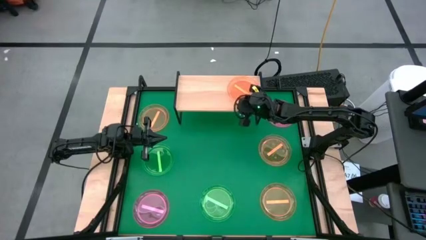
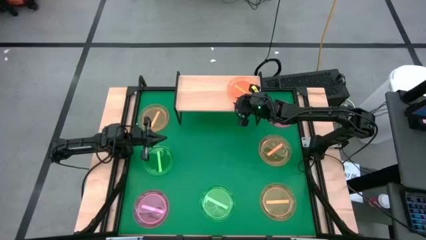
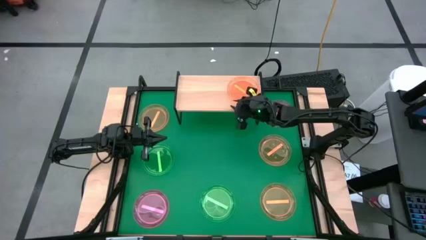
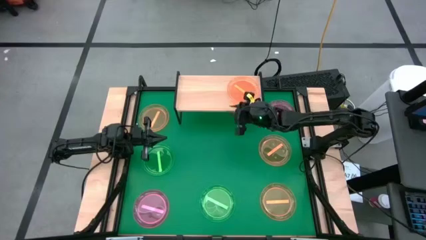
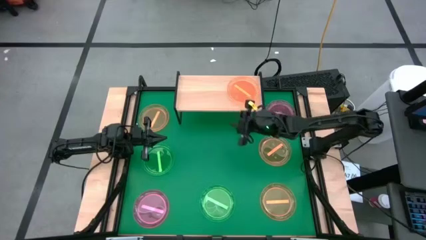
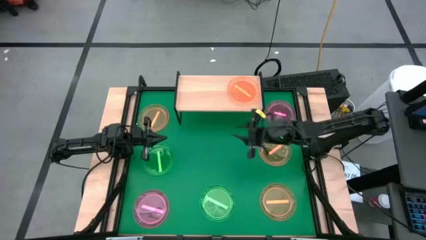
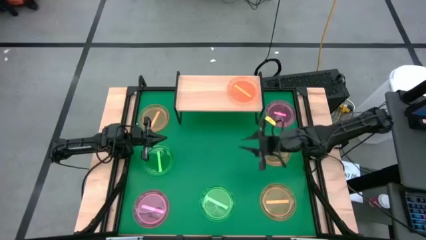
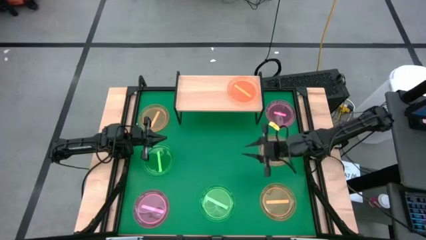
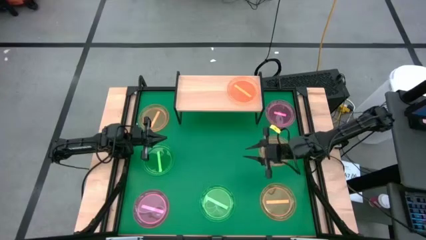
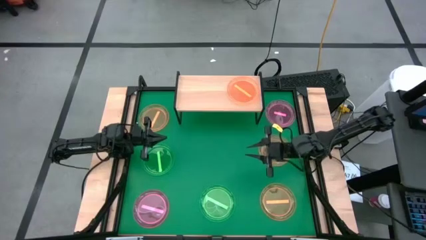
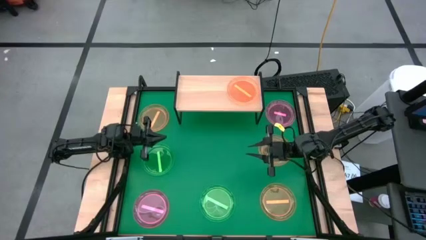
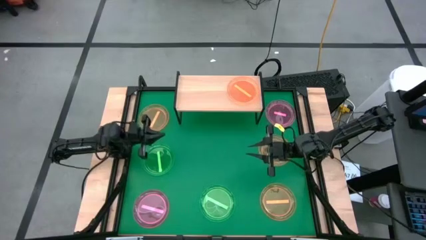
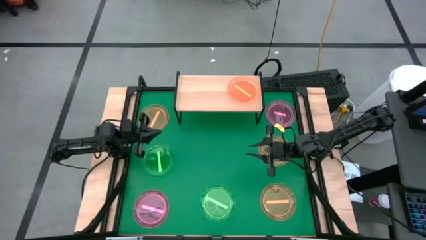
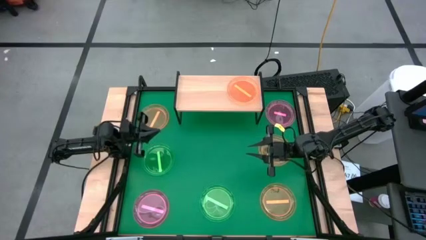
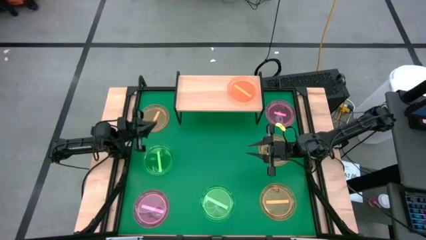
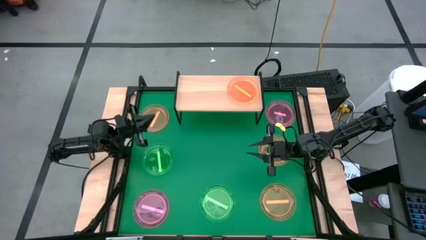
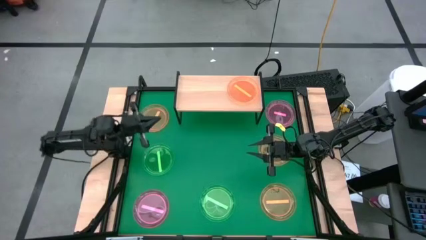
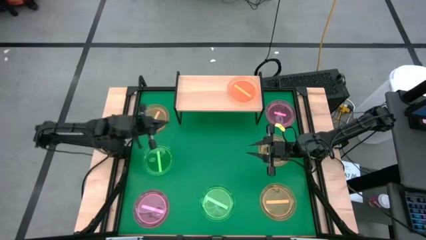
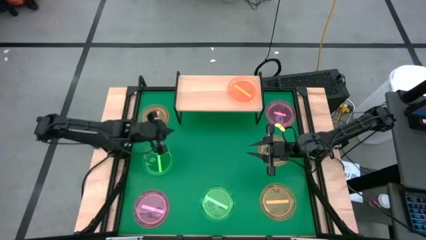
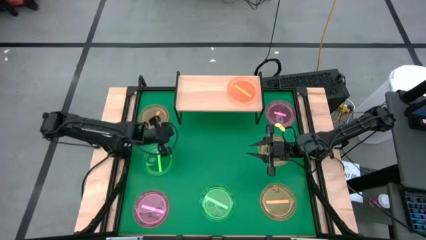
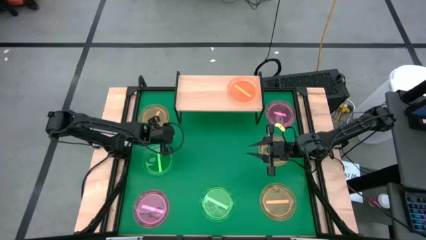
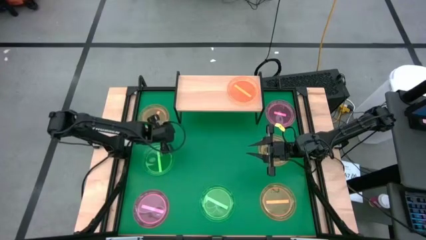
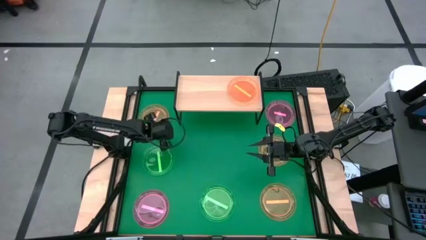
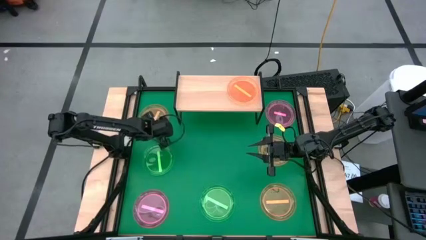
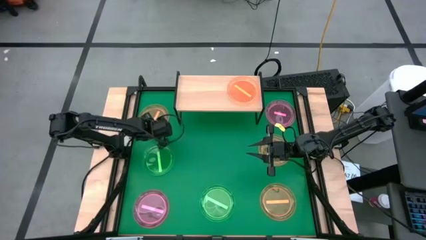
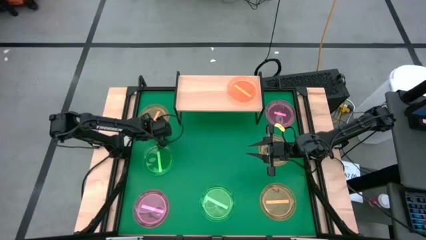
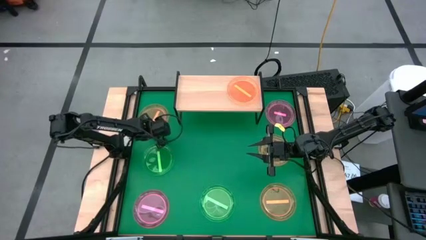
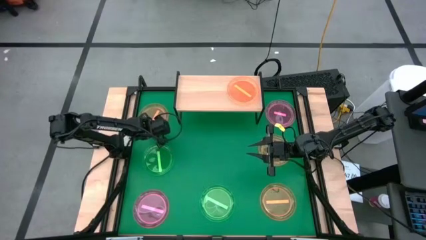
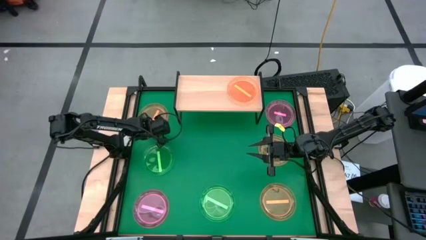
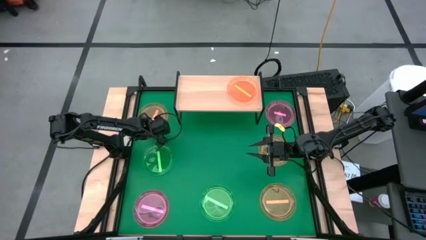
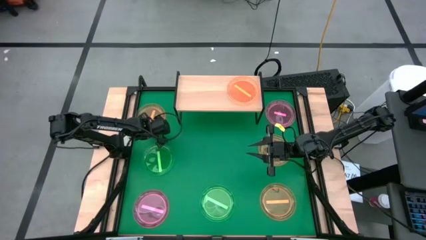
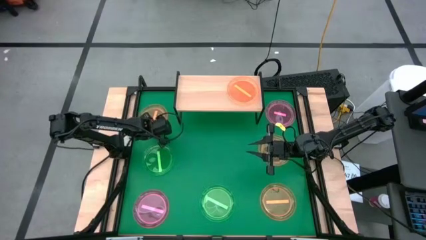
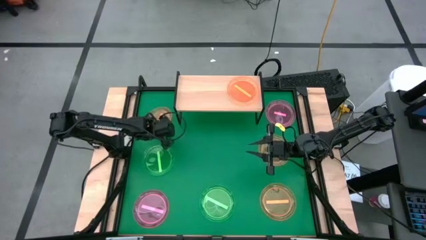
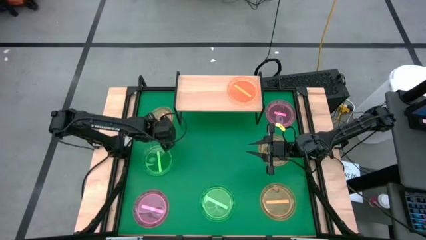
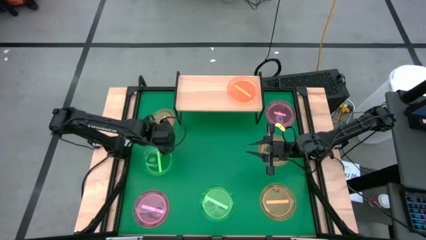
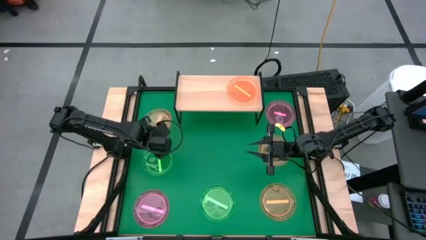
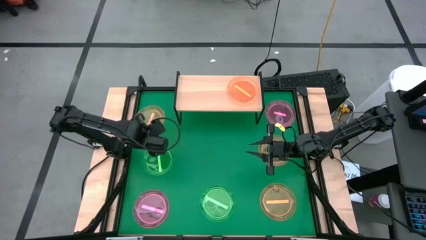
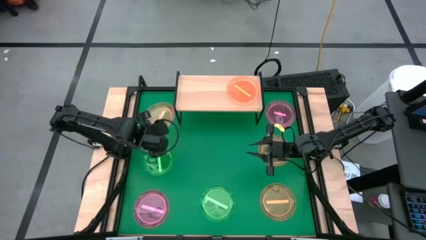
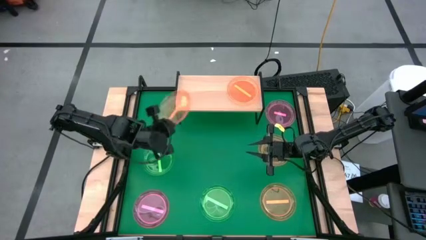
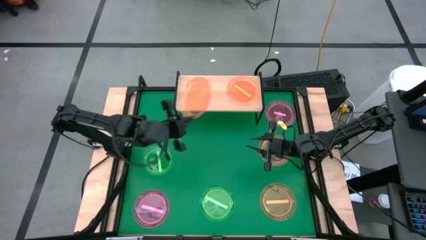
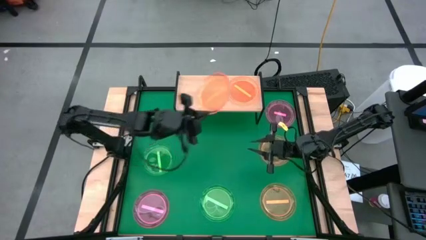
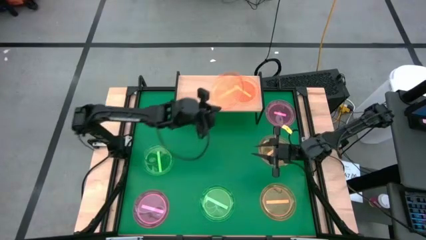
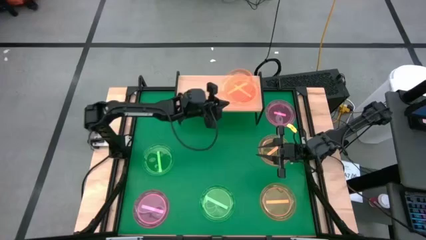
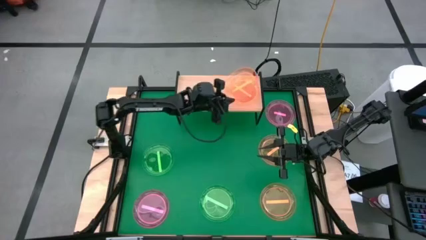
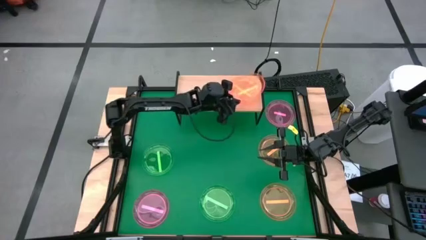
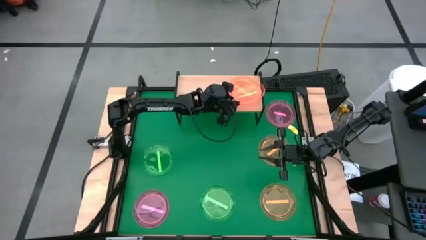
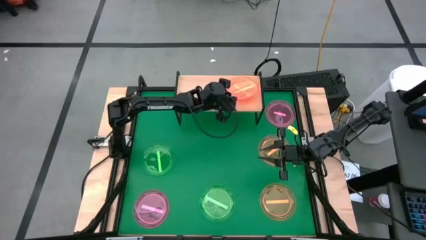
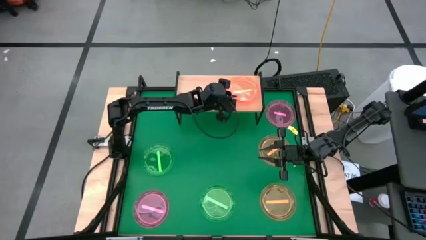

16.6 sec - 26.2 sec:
Task: Place and stack plates onto a shelf
Stack the orange plate on top of the orange plate on the shelf

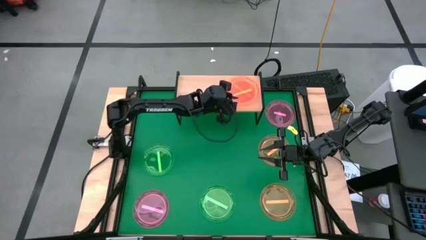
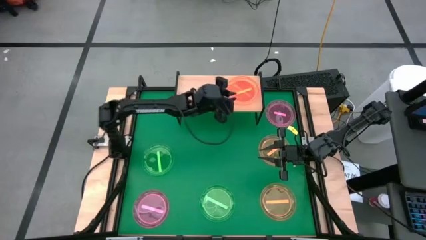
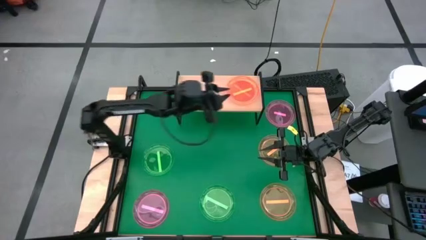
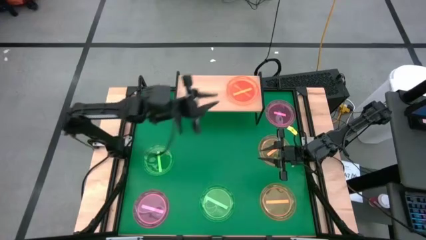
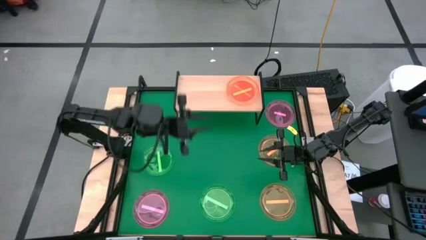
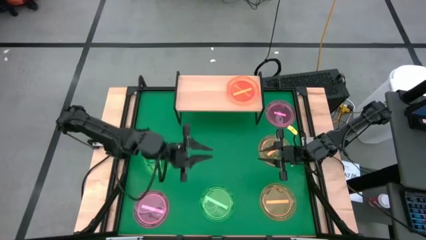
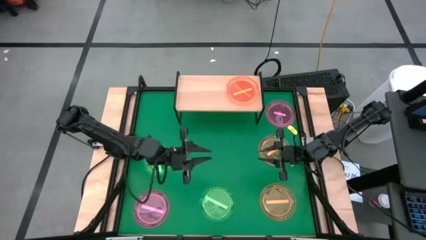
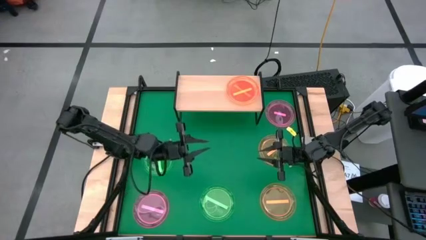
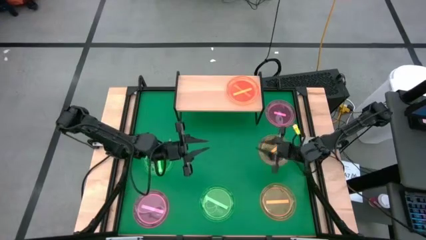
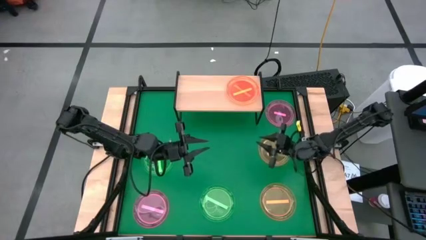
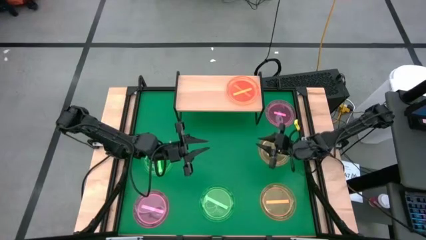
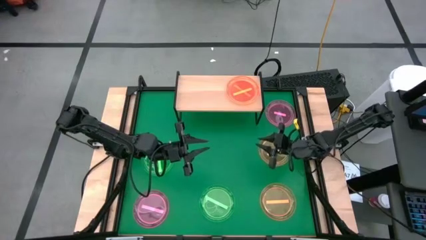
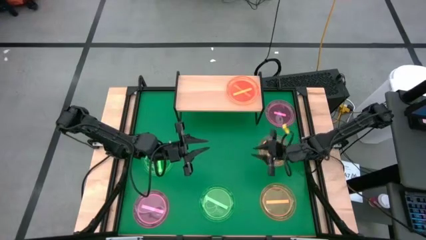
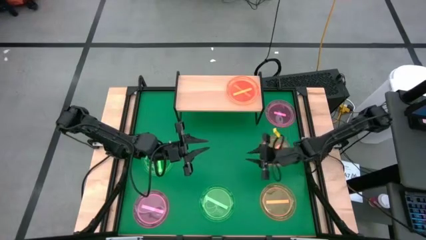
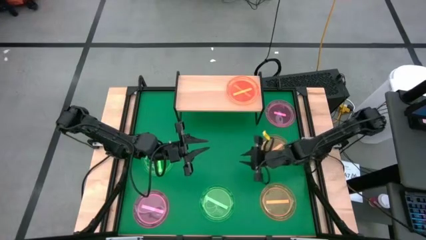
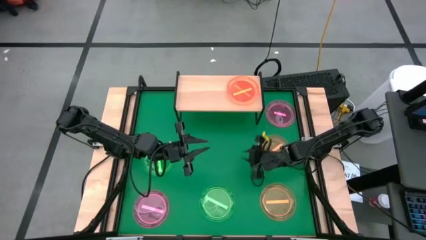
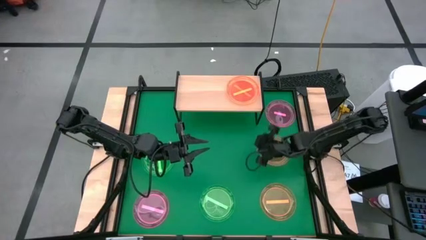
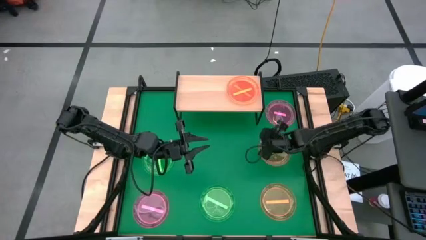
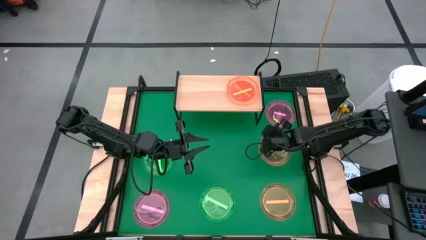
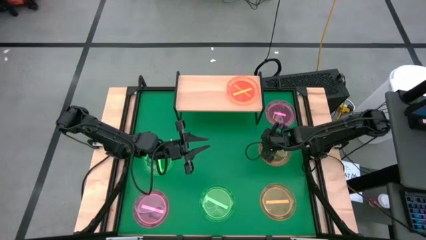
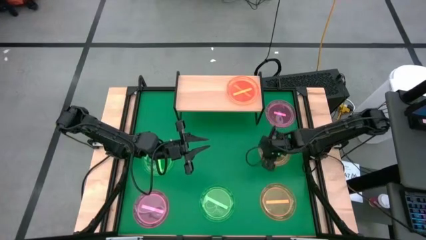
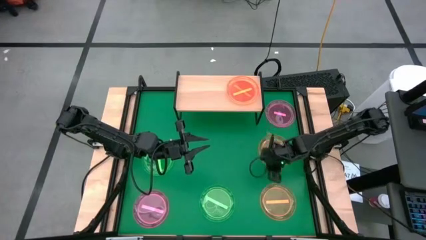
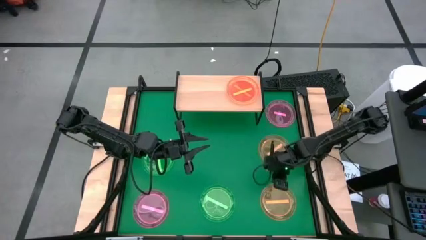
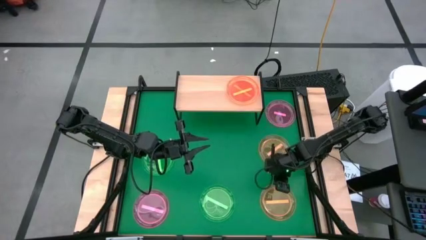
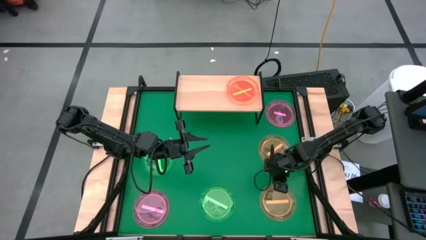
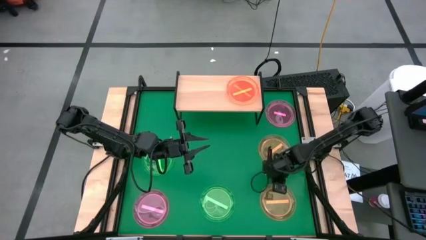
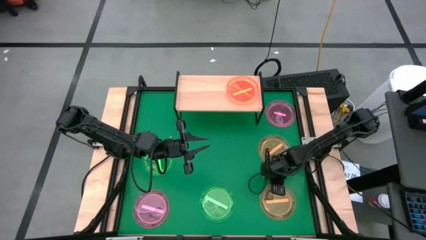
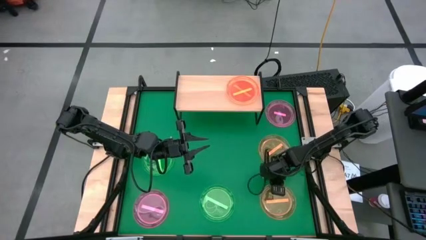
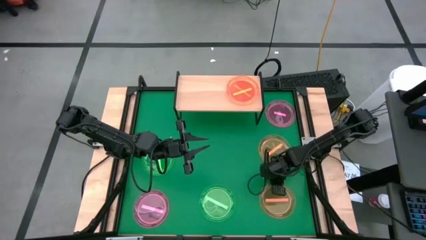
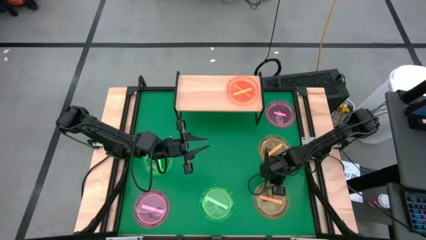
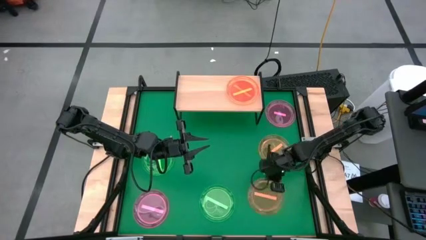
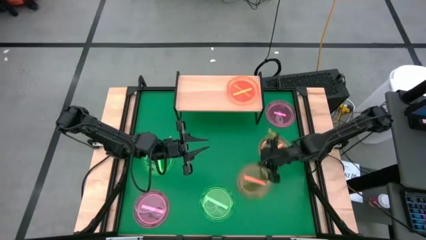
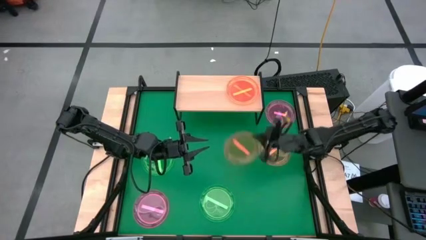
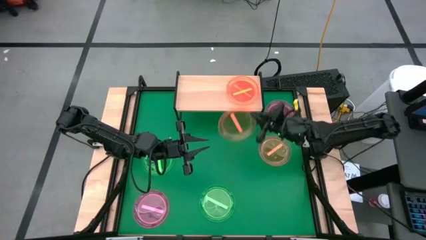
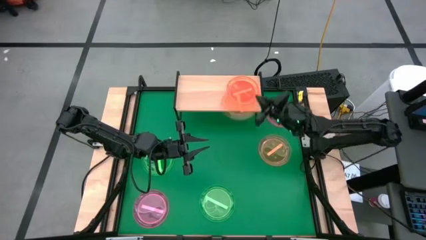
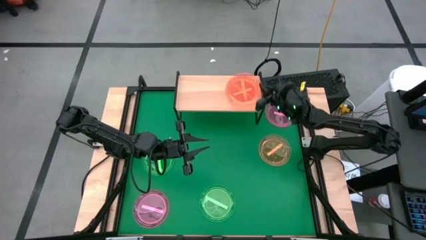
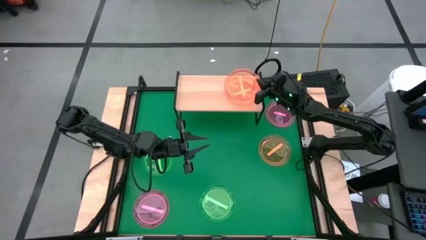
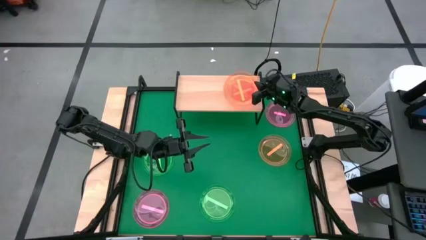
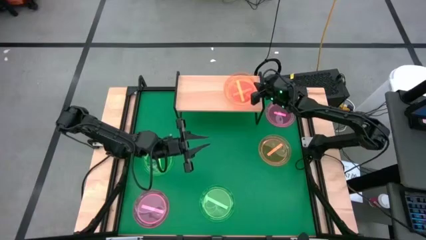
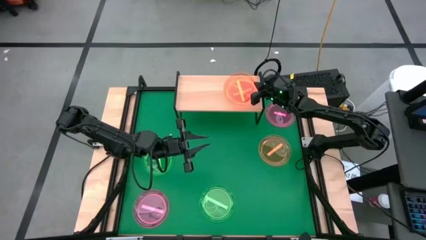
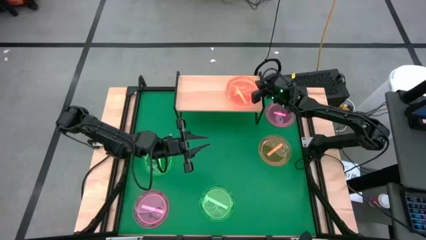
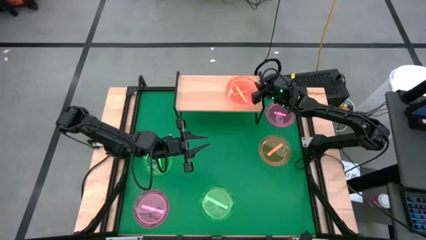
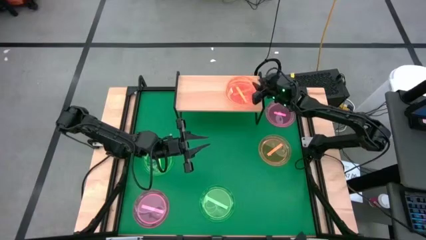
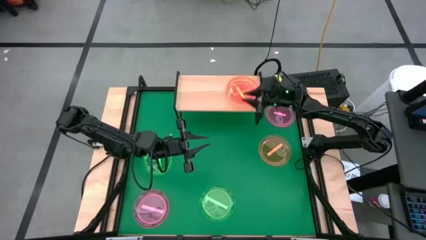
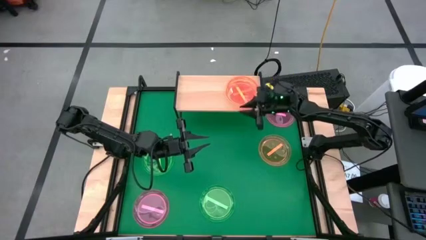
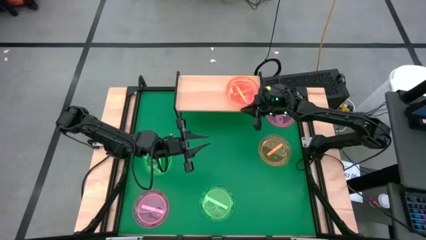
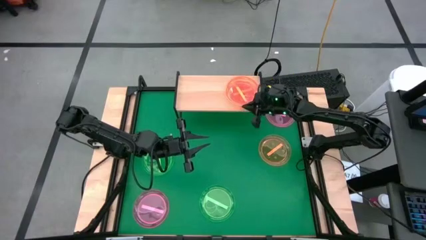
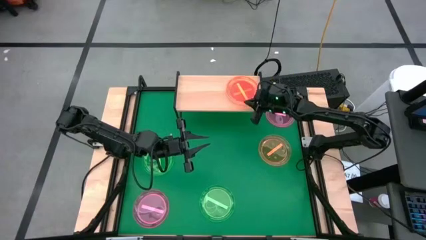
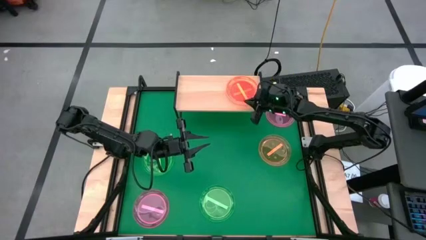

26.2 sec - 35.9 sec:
Stack the orange plate on top of the orange plate on the shelf
